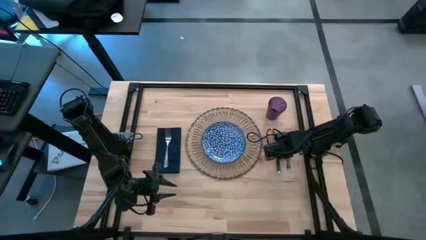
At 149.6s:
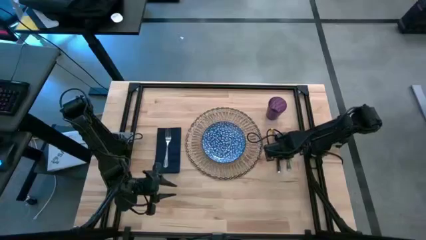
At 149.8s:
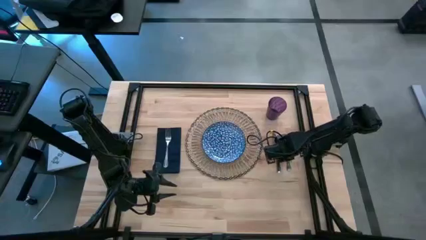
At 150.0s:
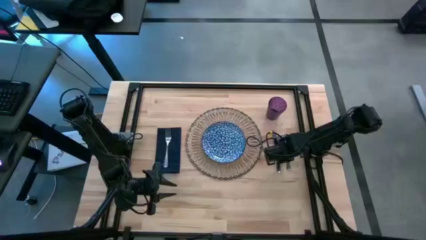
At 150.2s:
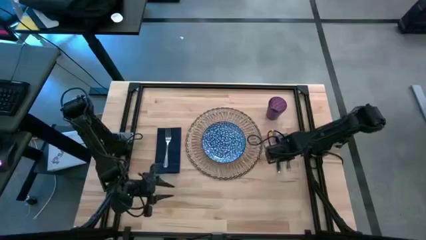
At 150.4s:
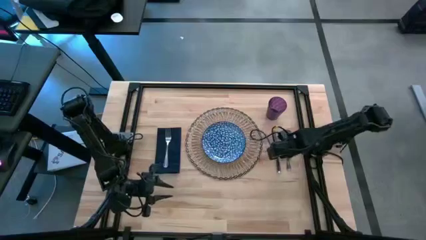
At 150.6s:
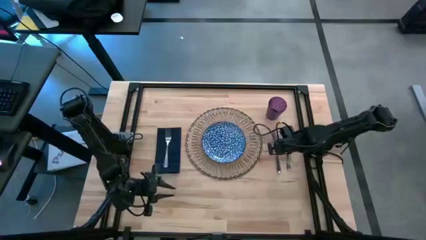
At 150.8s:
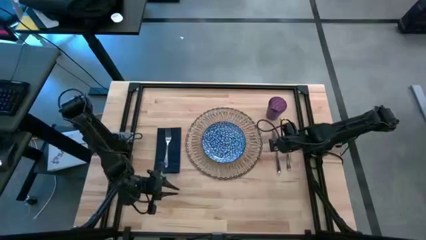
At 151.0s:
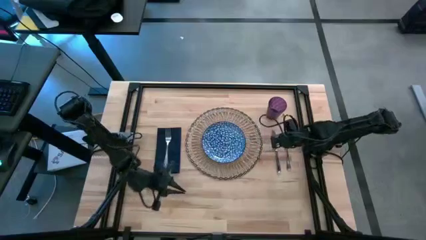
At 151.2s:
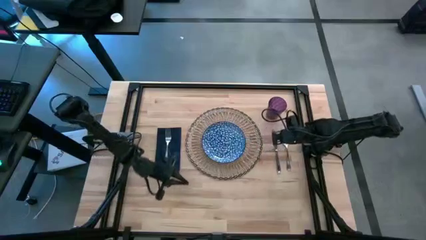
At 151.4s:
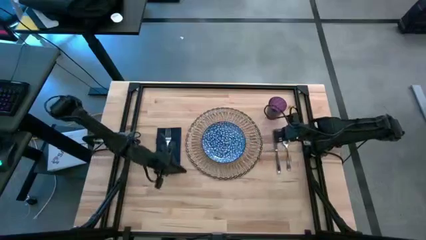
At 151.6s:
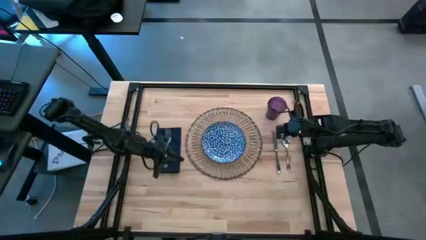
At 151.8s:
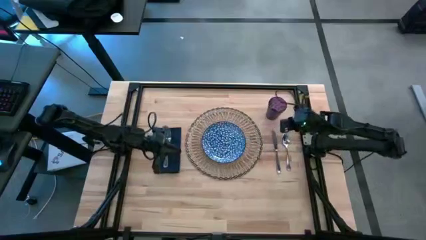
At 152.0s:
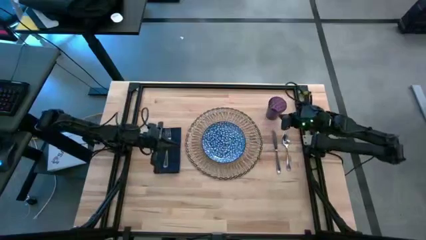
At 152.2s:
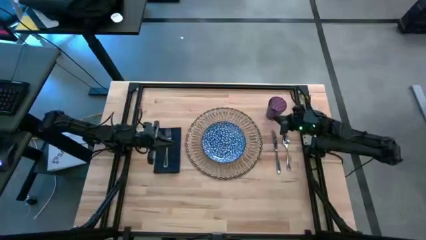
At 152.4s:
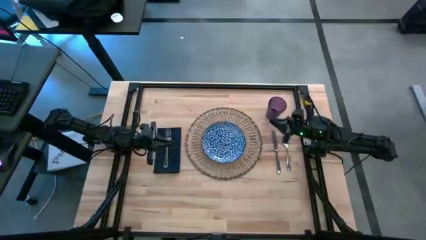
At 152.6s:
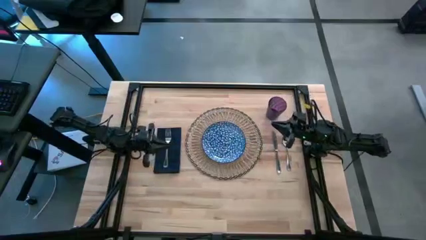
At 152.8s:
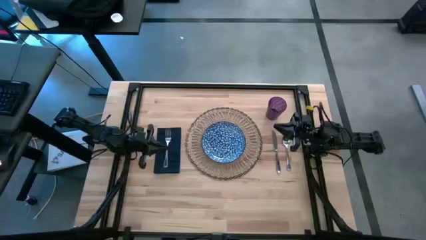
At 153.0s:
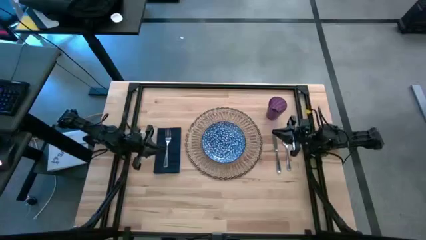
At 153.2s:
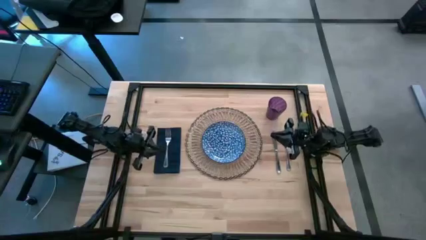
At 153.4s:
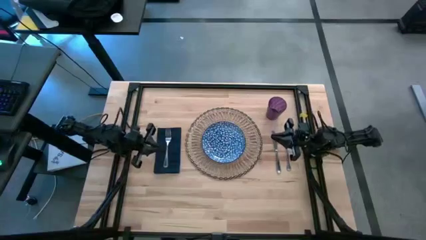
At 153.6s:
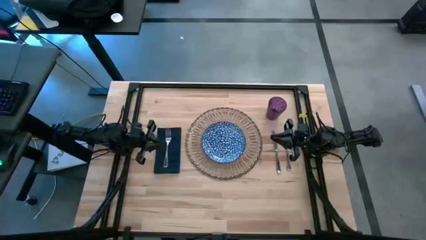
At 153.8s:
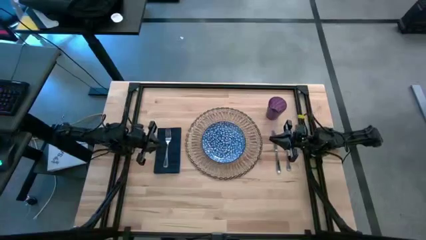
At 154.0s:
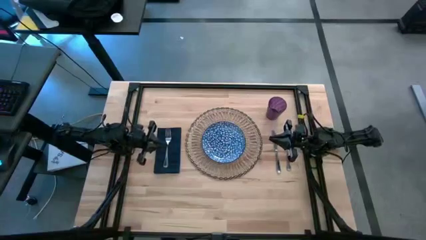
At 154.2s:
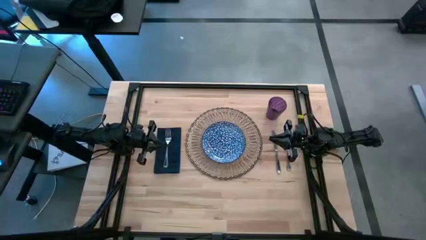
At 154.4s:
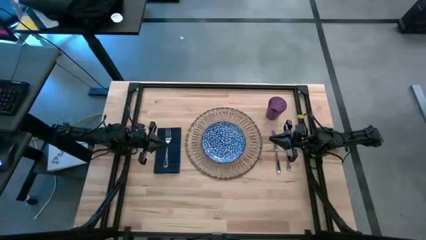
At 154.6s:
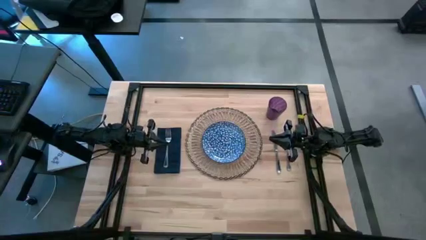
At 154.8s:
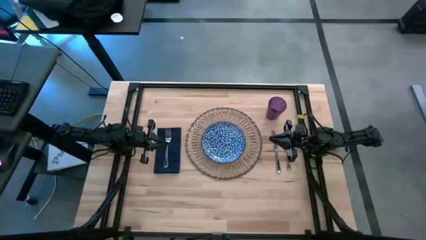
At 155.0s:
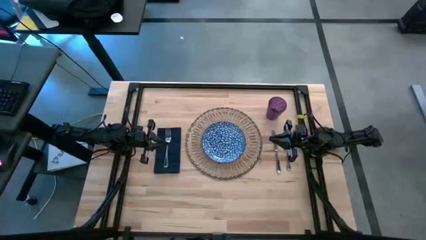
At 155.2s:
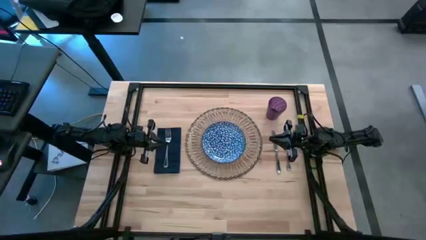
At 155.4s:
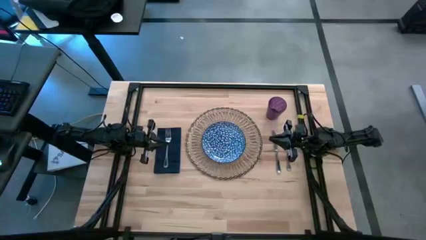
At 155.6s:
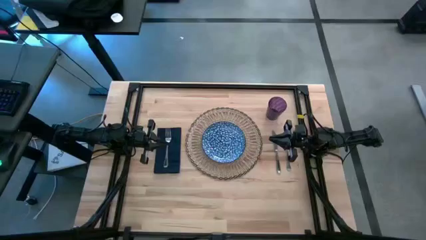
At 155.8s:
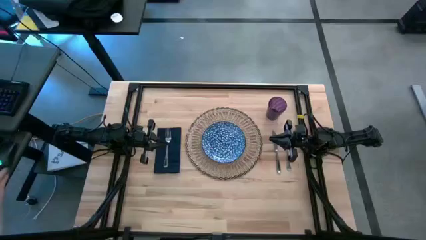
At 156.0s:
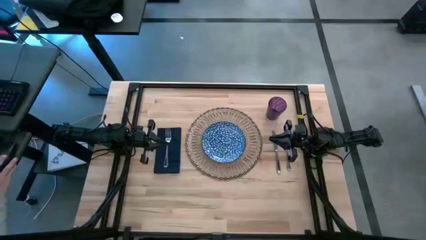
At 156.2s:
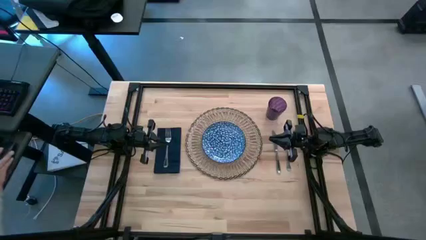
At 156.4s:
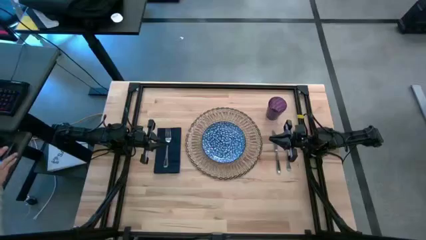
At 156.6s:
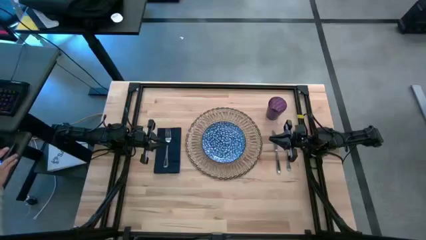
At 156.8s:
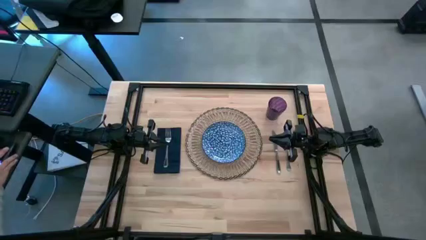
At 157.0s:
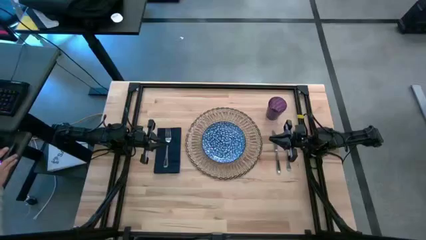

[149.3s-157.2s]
Task: Set table place
Return to Home Position

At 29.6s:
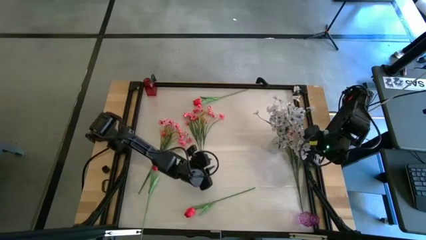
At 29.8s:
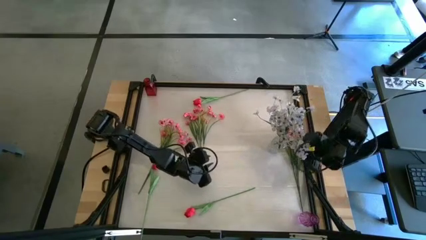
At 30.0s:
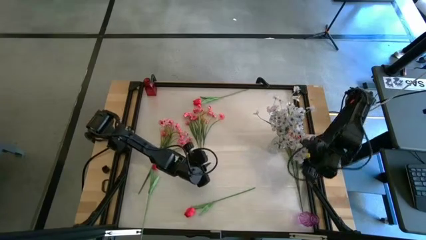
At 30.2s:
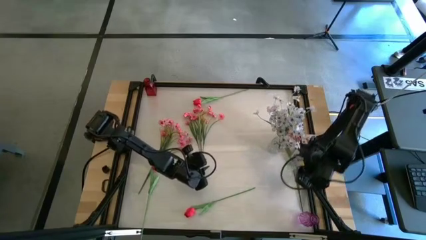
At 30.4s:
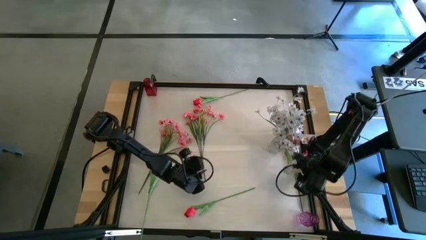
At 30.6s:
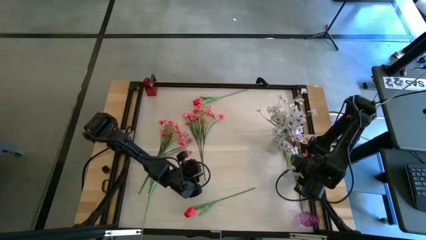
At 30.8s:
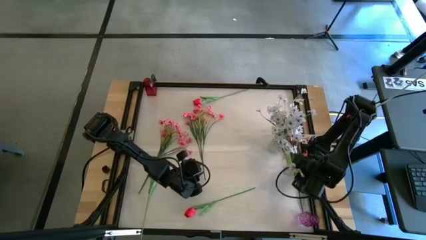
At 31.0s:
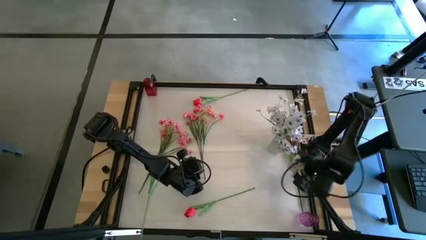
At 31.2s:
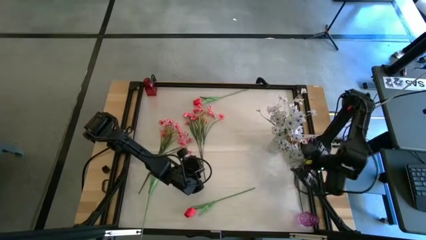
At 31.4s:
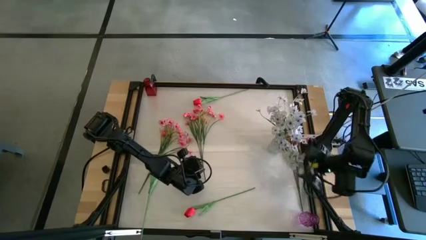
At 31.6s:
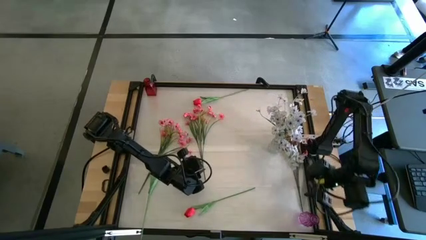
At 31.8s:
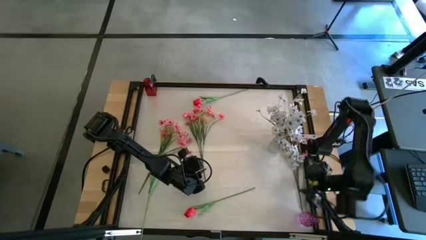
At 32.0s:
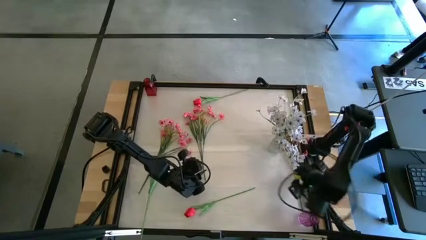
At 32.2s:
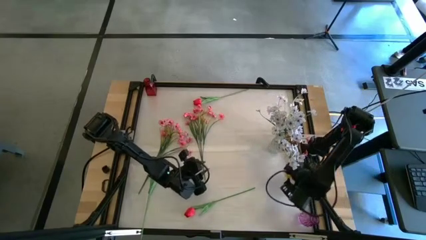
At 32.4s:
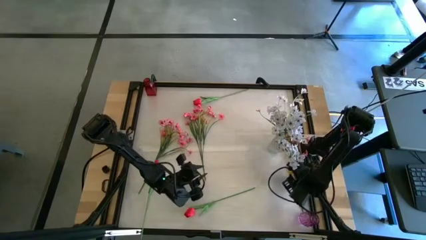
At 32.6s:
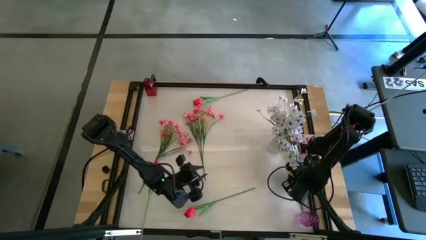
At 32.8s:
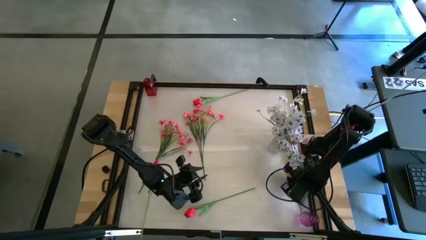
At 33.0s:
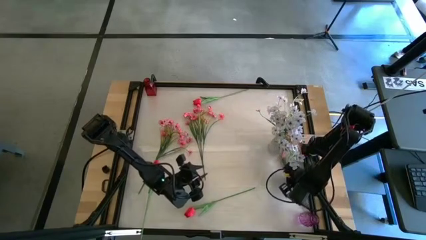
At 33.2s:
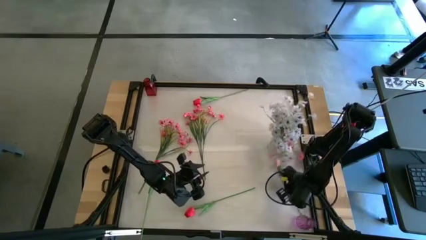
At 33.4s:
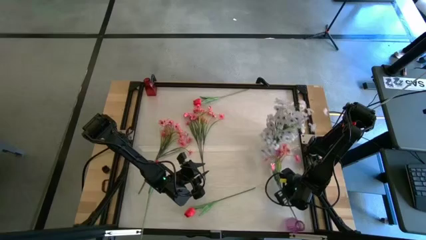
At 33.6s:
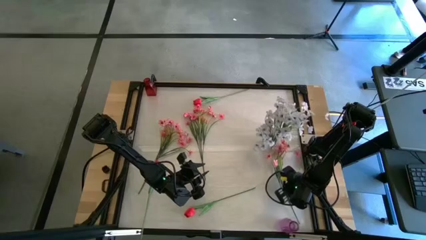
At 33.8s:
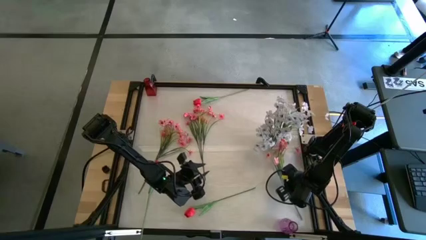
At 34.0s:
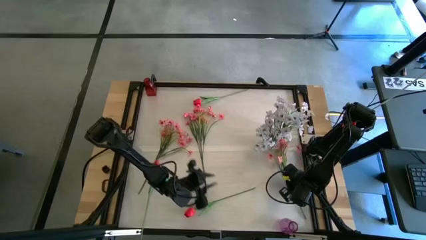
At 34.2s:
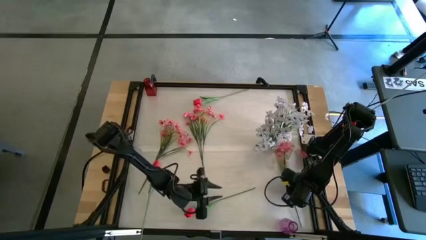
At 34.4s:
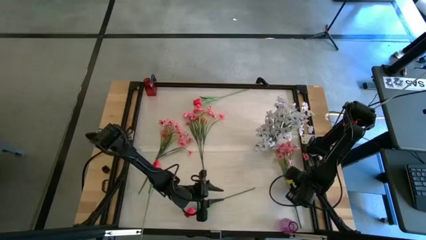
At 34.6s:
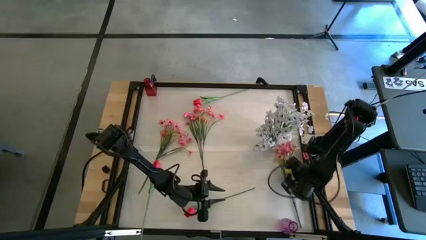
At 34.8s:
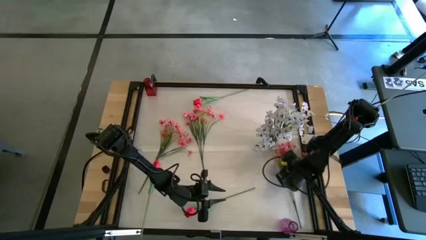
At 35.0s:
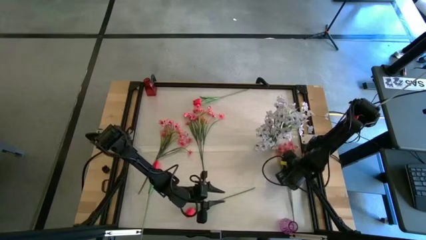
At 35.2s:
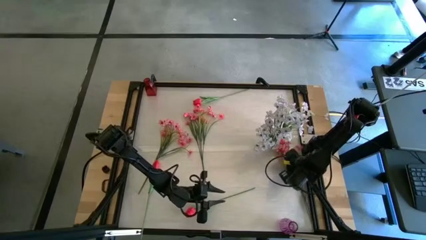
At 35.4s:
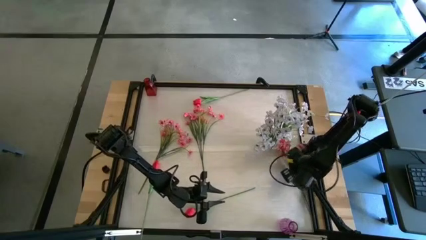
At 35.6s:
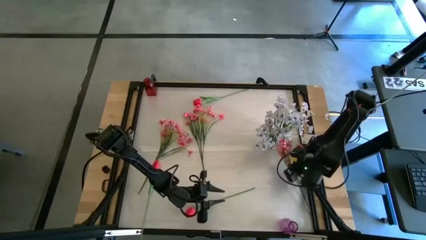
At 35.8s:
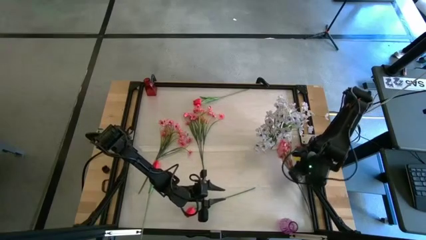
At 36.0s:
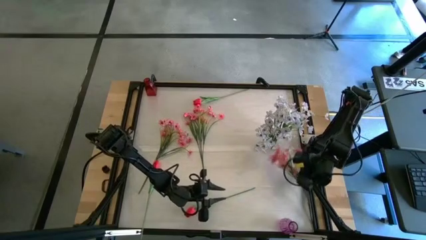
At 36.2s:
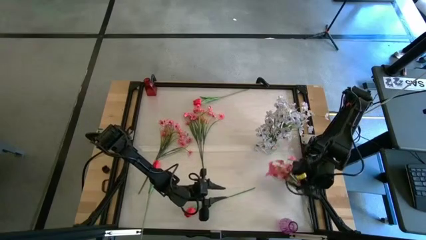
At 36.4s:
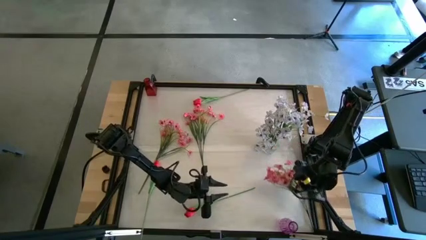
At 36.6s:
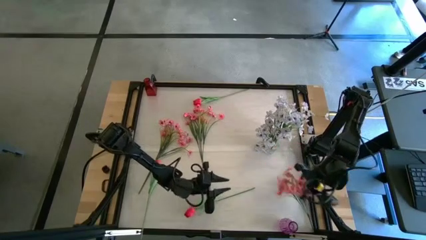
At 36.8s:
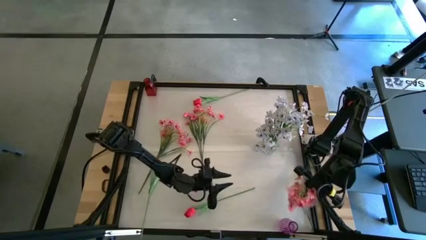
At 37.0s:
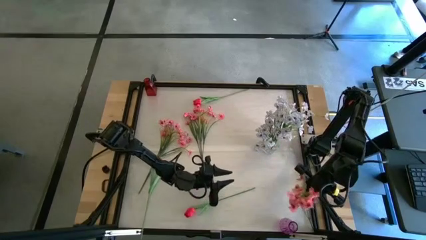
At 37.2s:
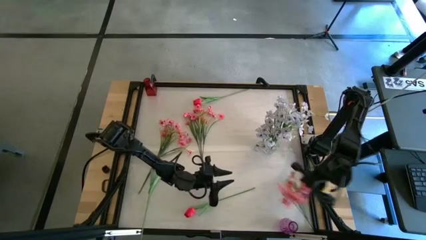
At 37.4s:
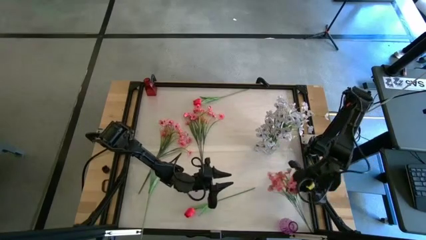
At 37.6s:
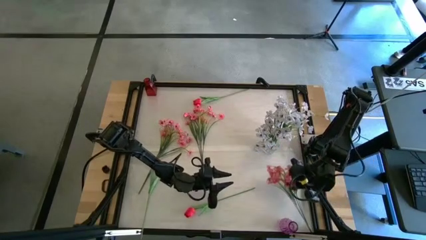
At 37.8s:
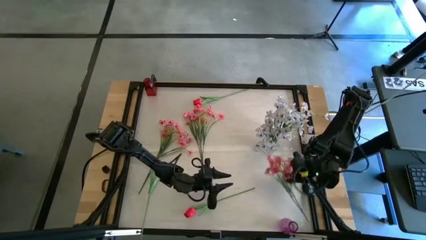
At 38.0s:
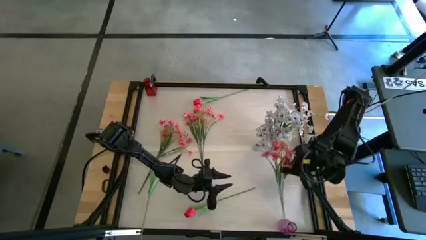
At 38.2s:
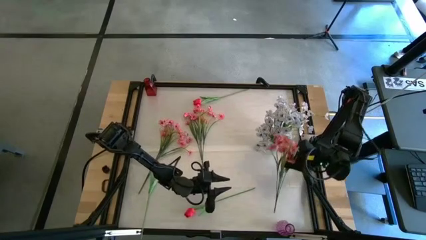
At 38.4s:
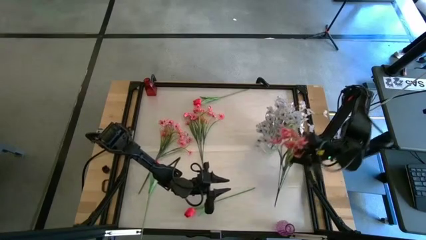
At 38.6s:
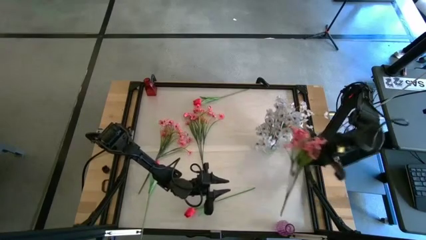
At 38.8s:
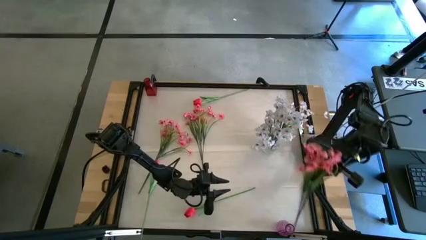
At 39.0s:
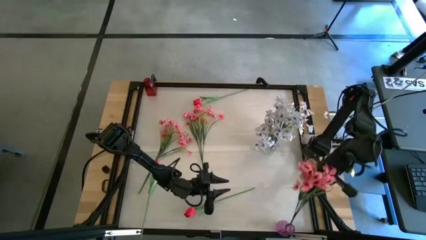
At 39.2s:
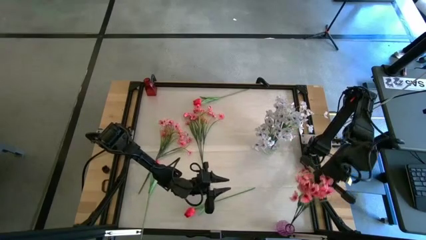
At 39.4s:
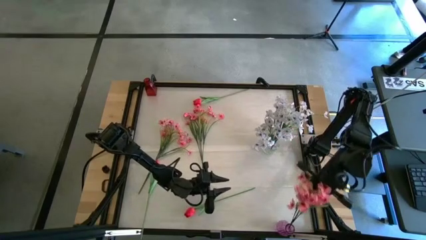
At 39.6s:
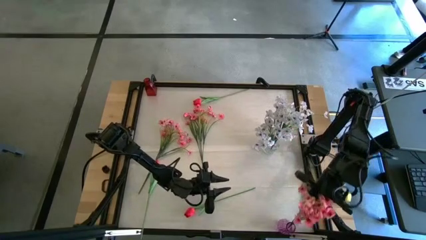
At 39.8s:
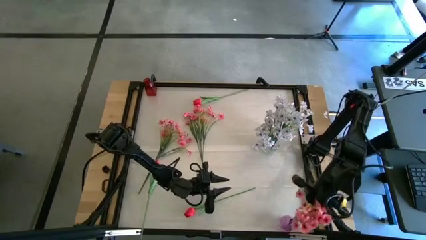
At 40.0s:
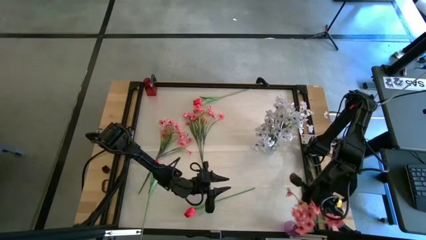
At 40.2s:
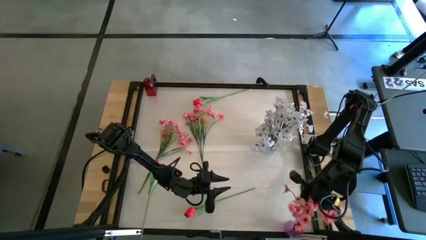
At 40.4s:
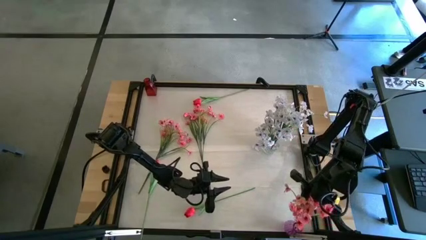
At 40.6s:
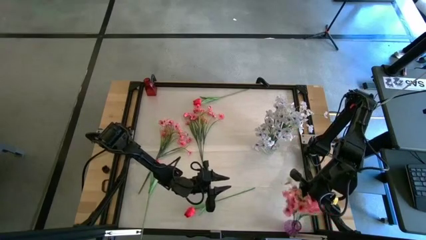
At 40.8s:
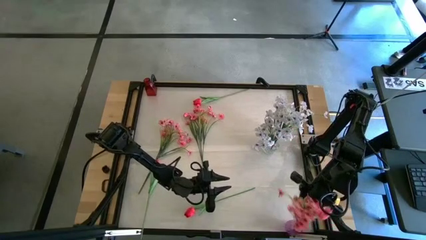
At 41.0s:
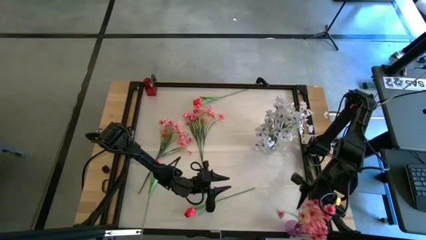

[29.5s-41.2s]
Task: Sort flowers into vase by color
Put the right pink flowers into the violet vase
